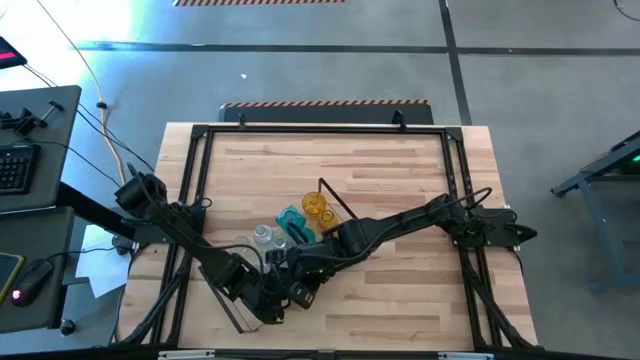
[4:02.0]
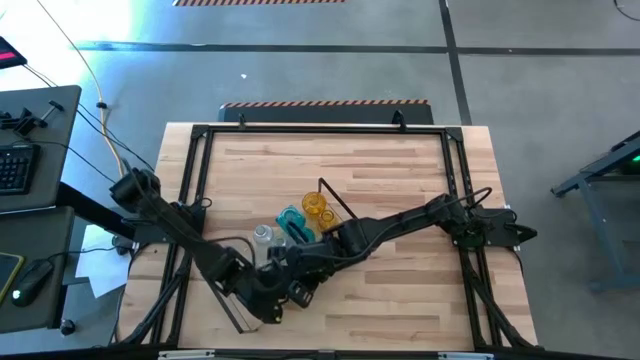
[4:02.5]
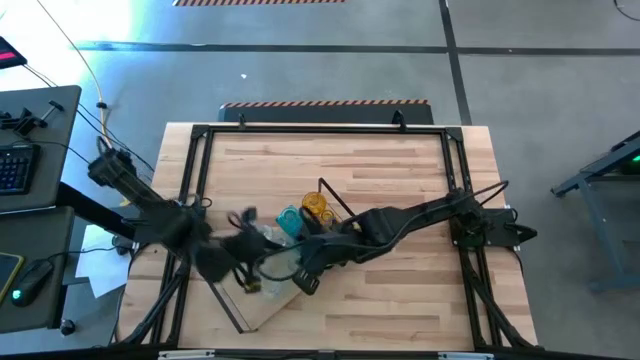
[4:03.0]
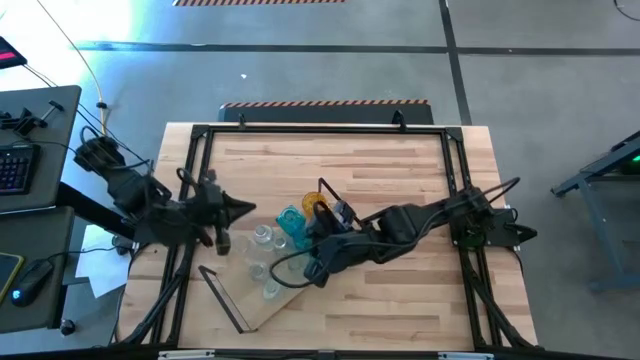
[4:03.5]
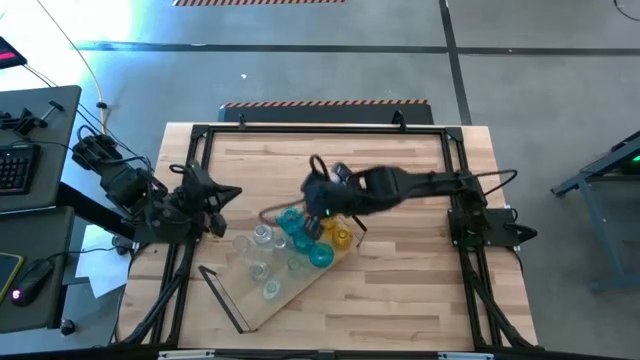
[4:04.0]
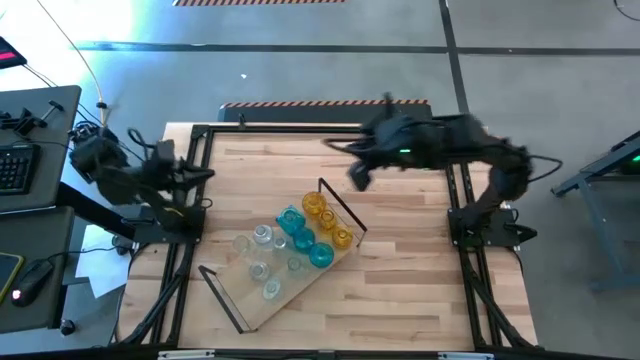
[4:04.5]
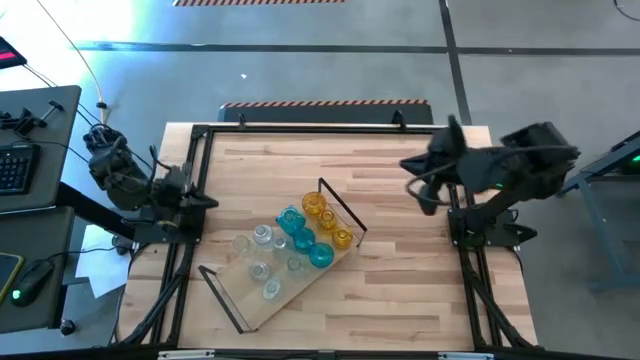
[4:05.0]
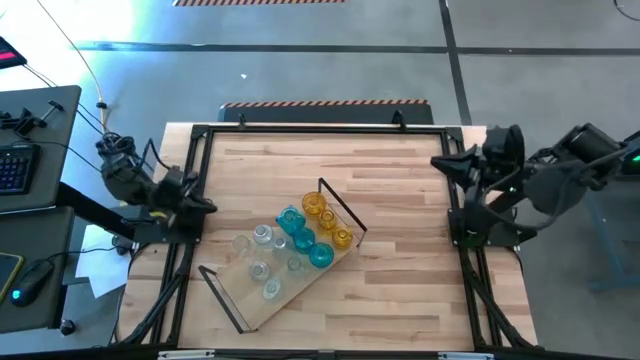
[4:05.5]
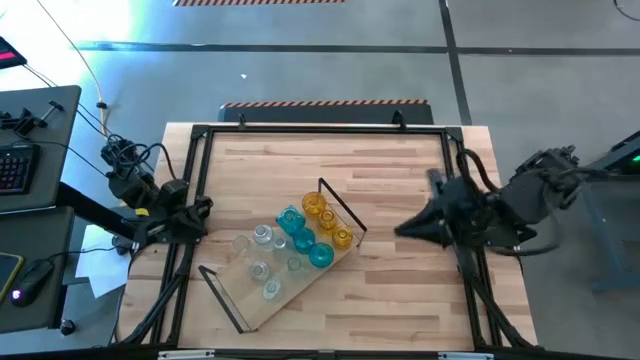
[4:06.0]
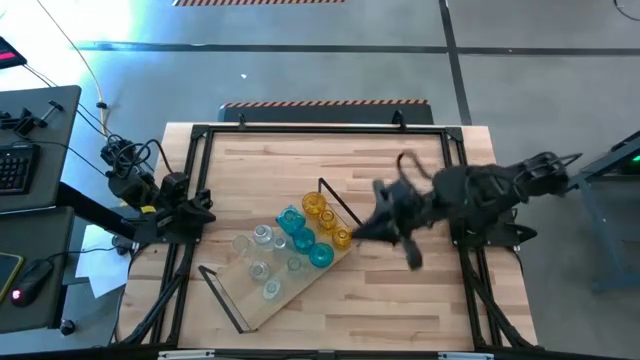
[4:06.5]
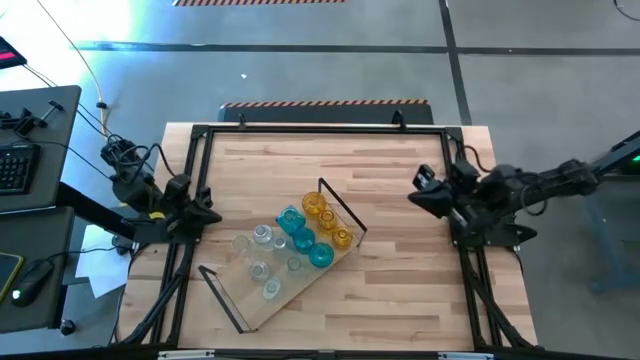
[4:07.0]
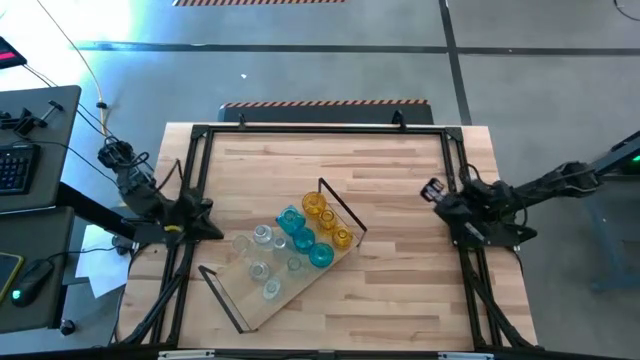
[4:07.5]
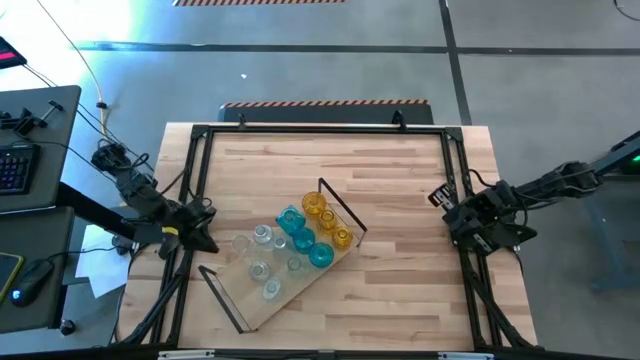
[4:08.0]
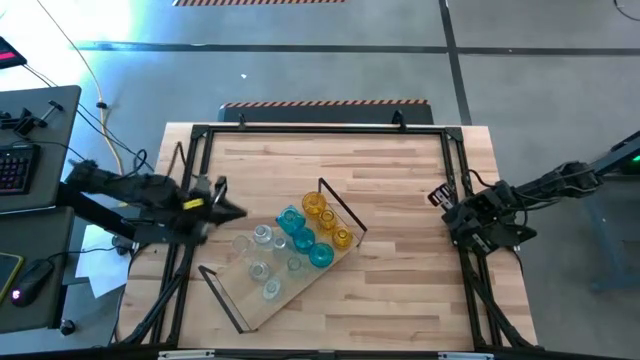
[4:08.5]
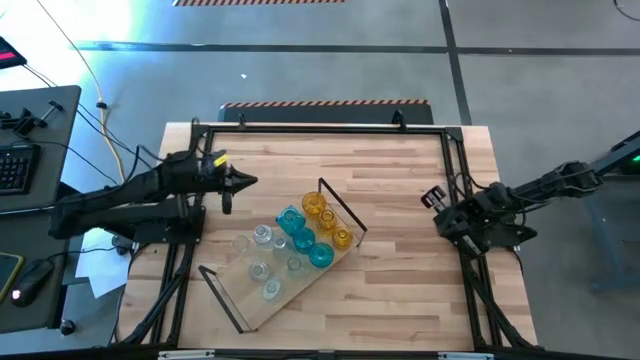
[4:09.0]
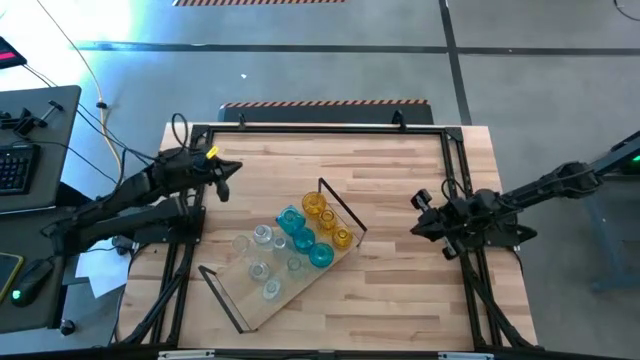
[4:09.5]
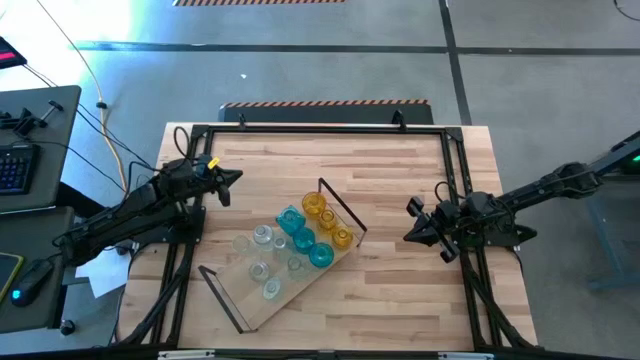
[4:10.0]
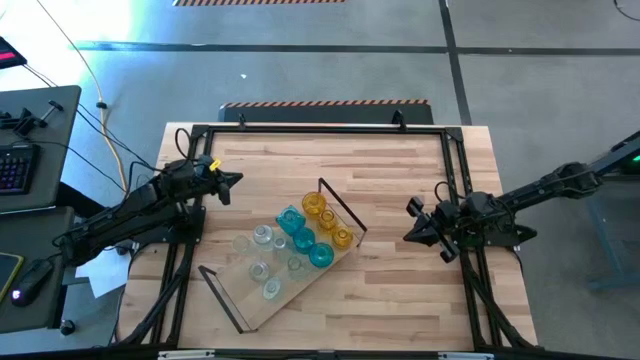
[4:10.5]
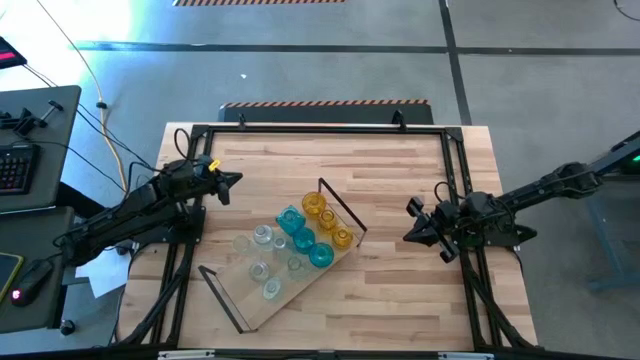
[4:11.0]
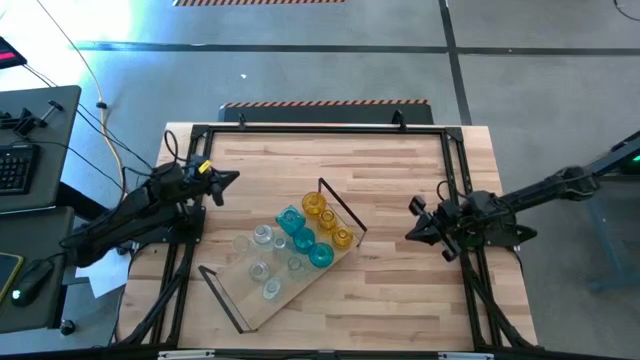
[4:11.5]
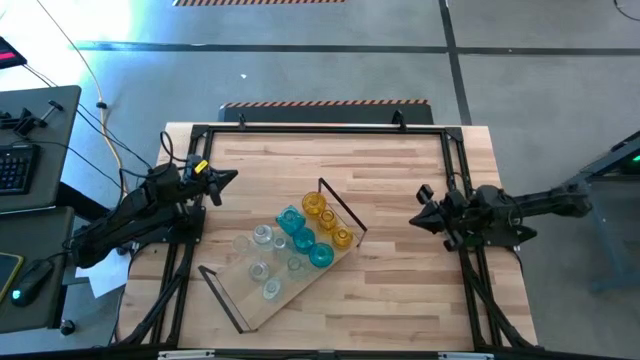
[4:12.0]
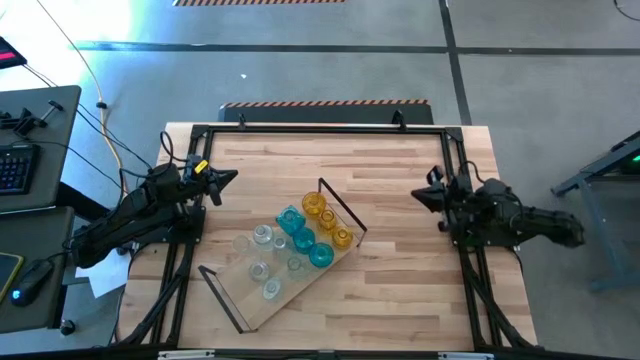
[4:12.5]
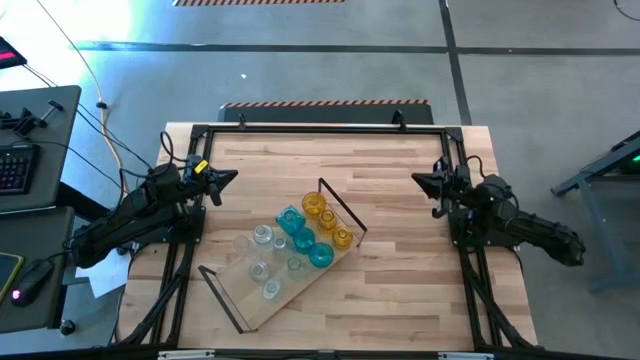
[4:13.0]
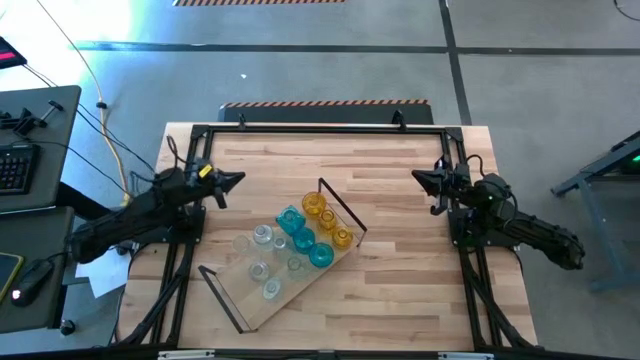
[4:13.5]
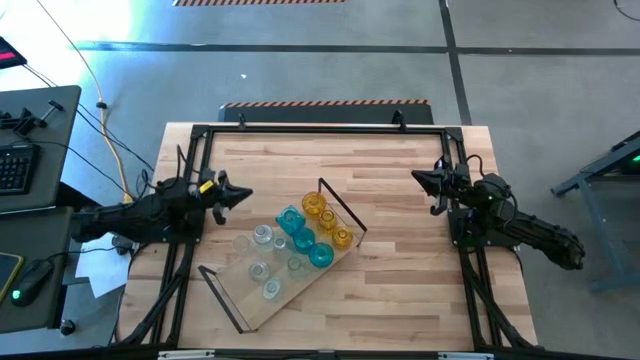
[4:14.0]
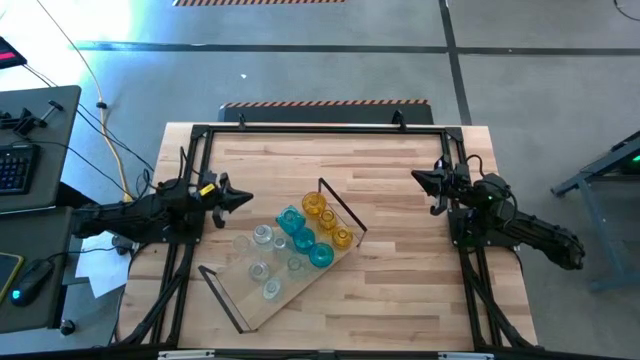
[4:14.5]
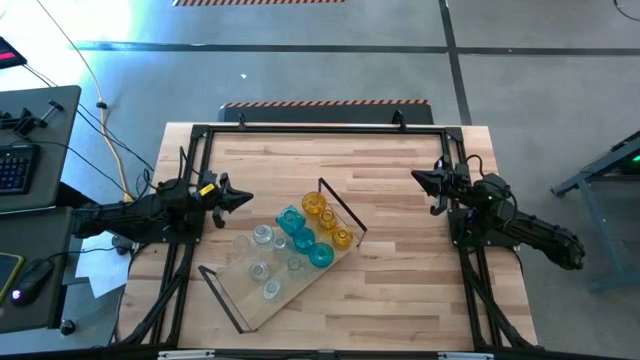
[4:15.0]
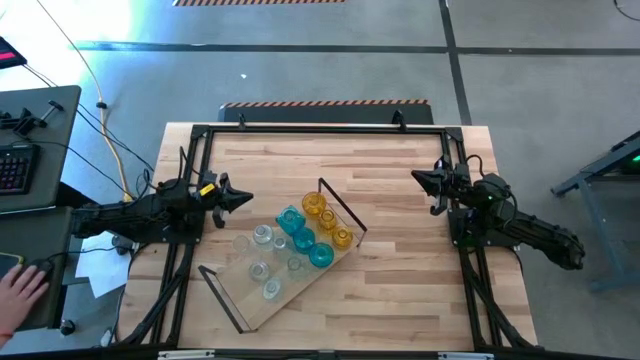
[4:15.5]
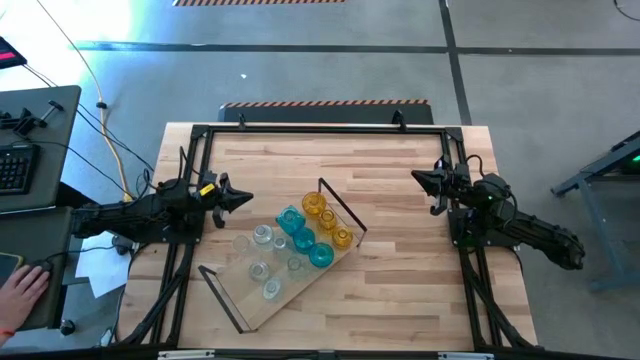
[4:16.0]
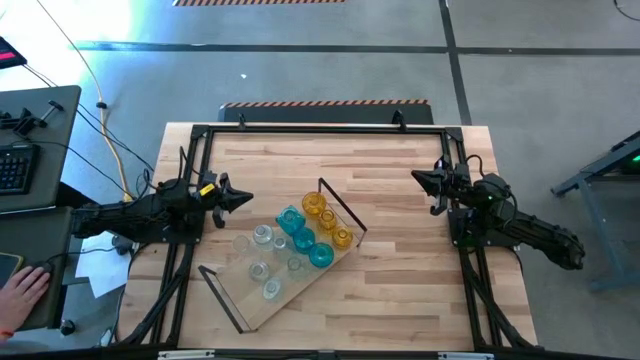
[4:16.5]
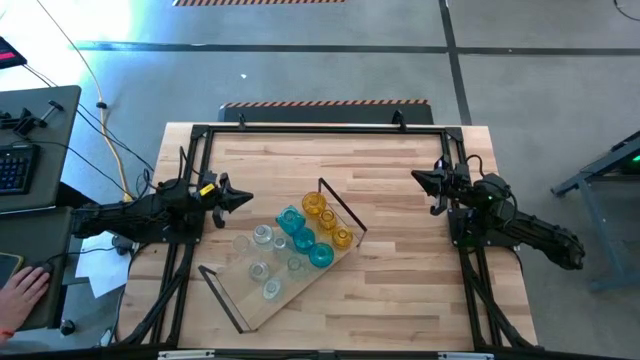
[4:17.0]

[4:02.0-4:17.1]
Task: sort vases onto shelf
Return to Home Position

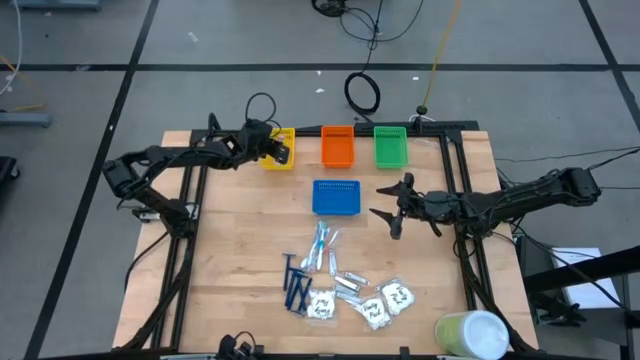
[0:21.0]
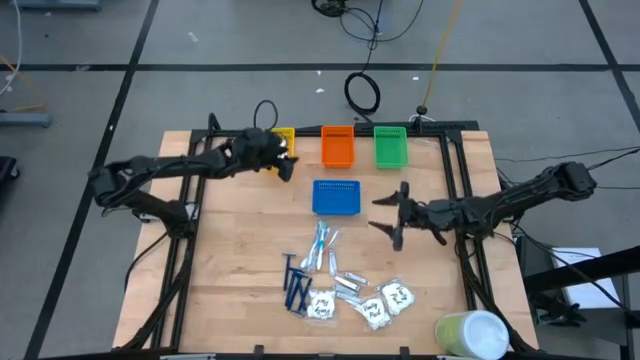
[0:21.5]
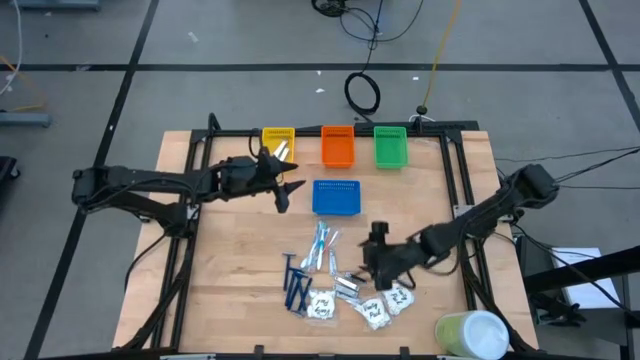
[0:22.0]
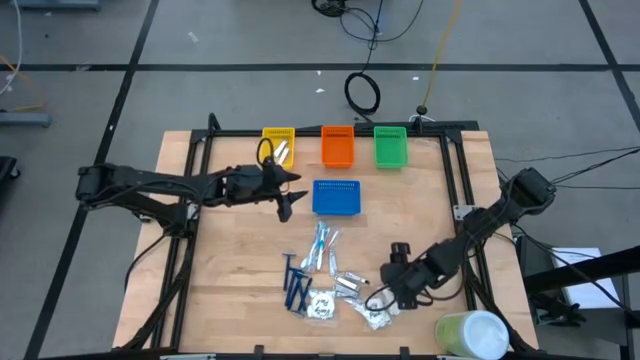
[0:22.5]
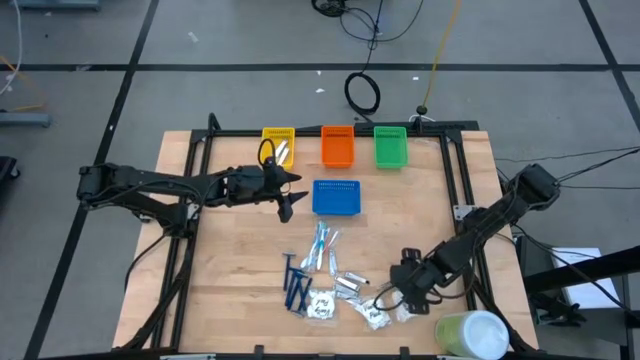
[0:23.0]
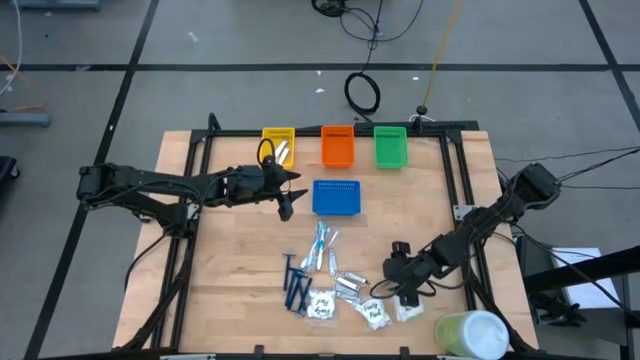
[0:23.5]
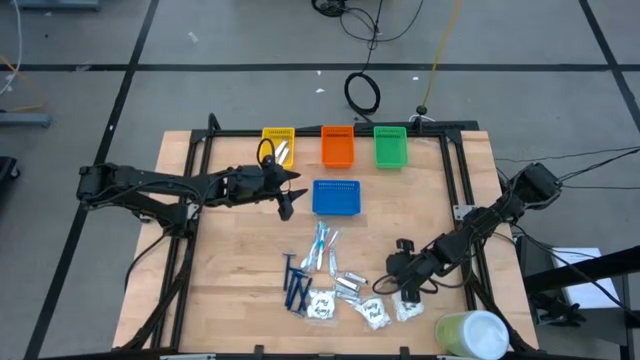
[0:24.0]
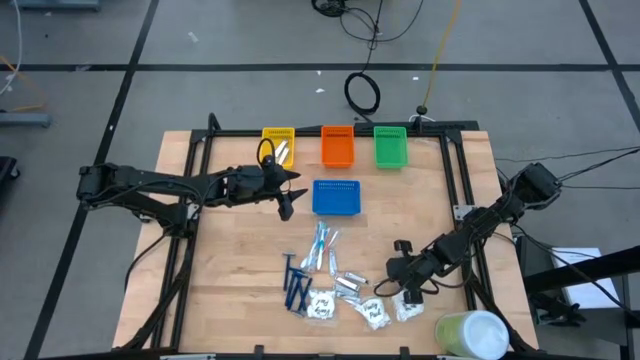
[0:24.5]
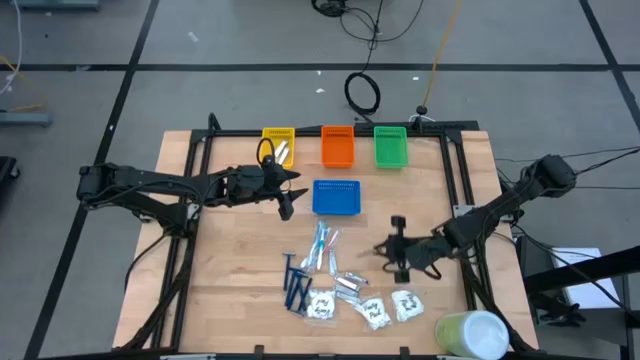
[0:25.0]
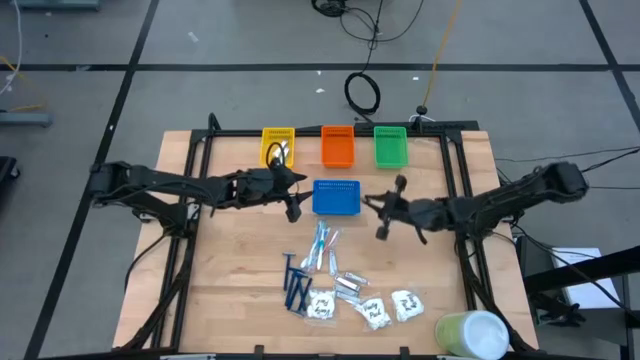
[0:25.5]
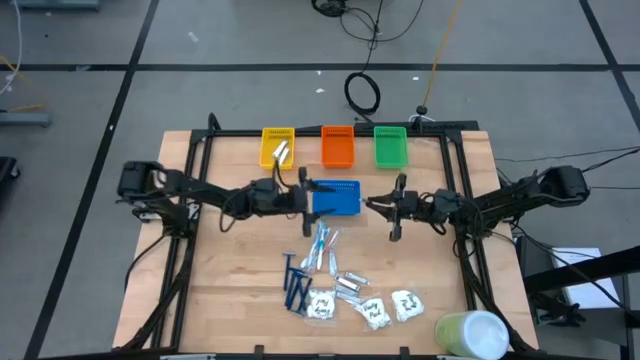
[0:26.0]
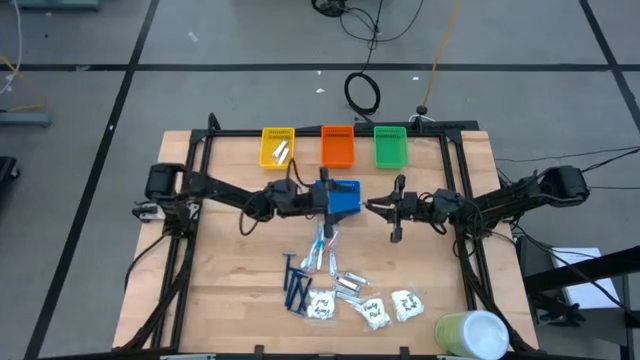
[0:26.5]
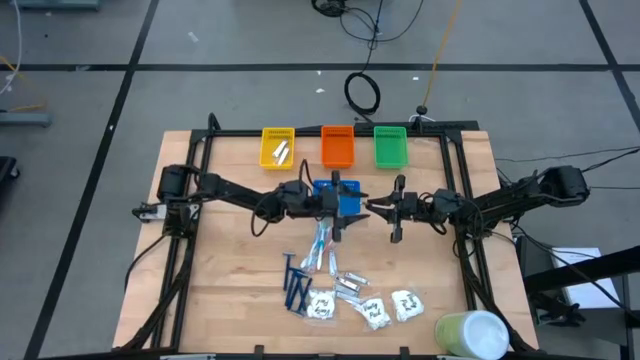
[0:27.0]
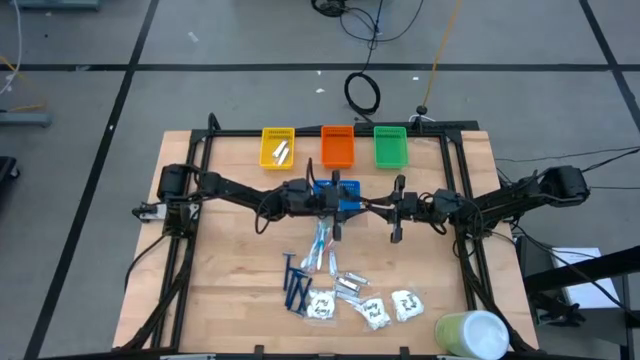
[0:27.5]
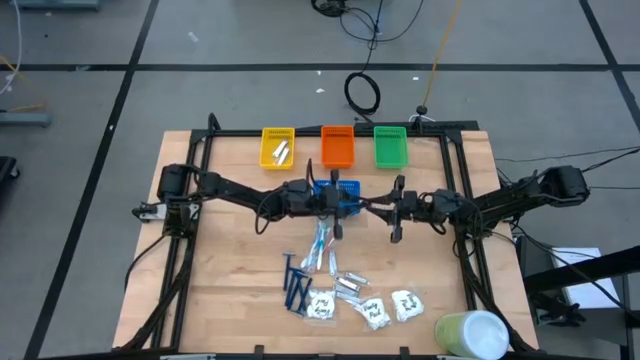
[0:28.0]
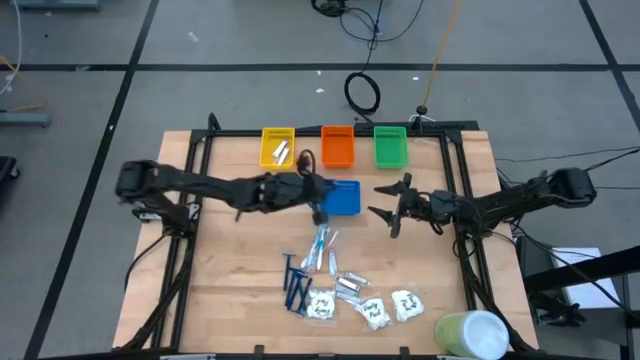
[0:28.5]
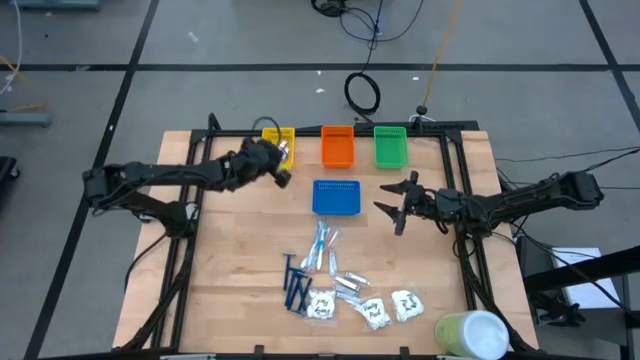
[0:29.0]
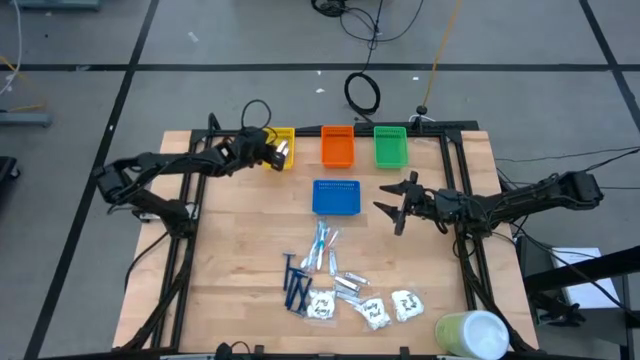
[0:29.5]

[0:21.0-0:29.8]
Task: Pick & Place Travel size toiletries
Put the silver nail cutter into the yellow basket
